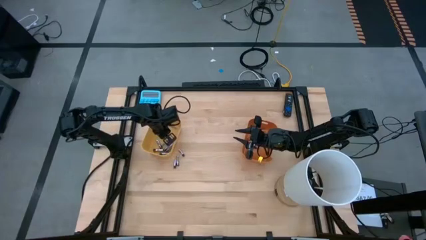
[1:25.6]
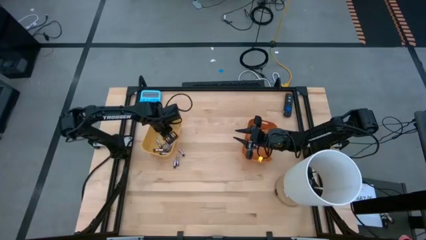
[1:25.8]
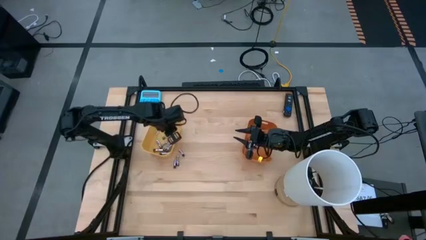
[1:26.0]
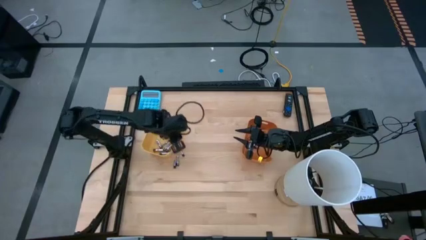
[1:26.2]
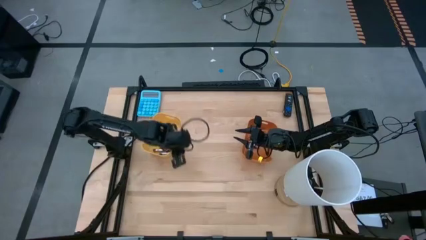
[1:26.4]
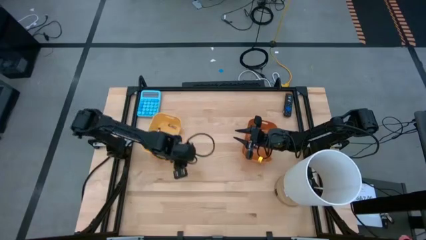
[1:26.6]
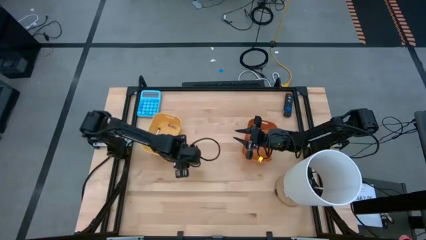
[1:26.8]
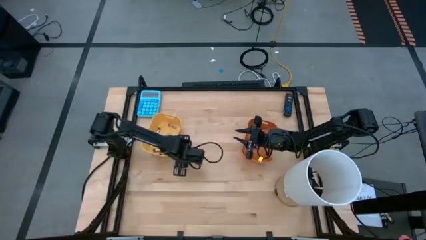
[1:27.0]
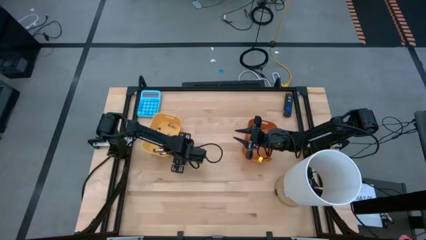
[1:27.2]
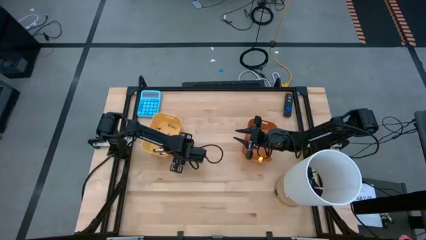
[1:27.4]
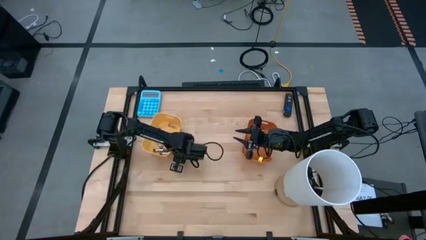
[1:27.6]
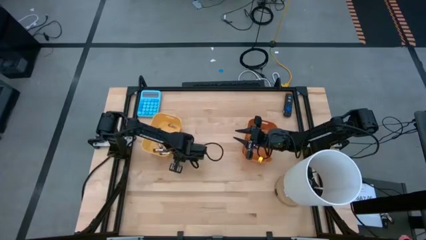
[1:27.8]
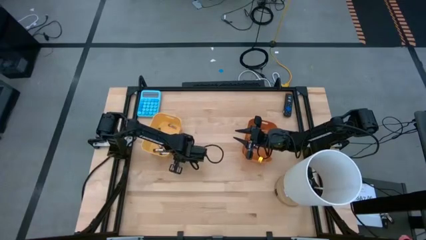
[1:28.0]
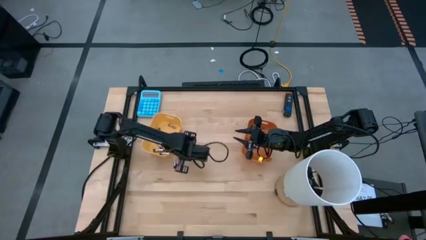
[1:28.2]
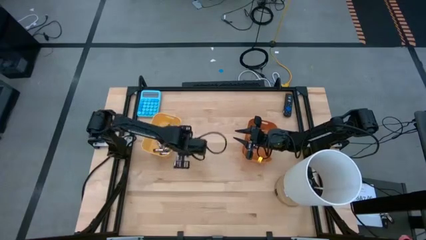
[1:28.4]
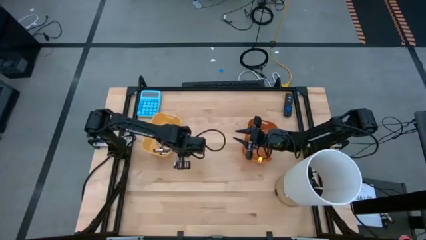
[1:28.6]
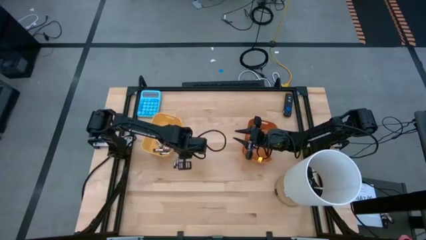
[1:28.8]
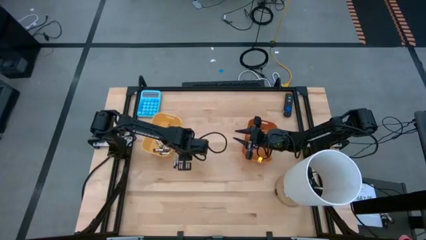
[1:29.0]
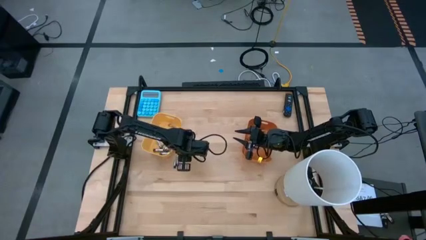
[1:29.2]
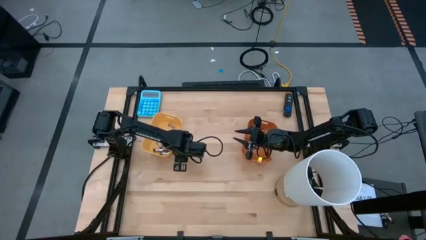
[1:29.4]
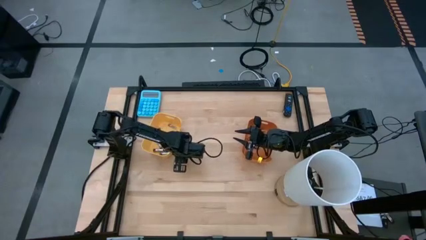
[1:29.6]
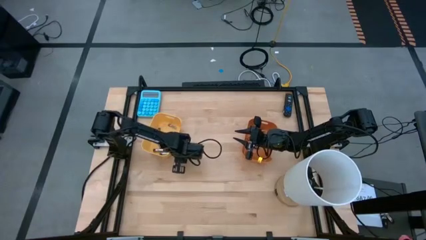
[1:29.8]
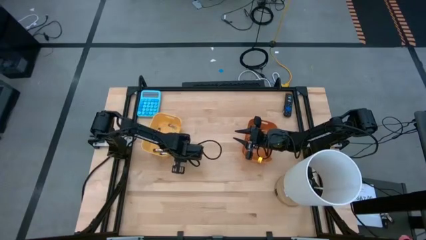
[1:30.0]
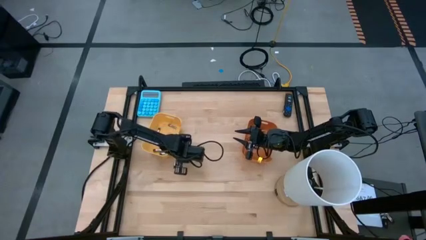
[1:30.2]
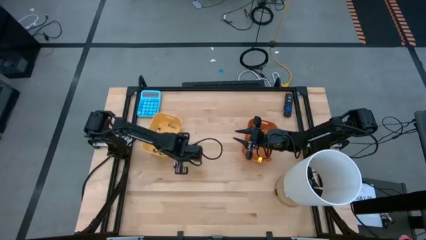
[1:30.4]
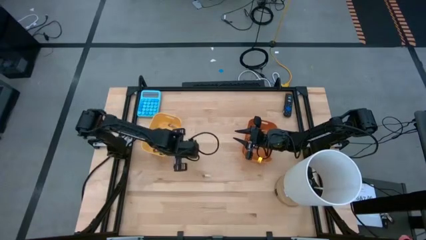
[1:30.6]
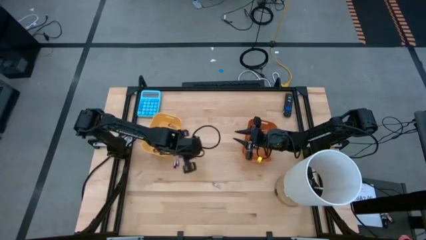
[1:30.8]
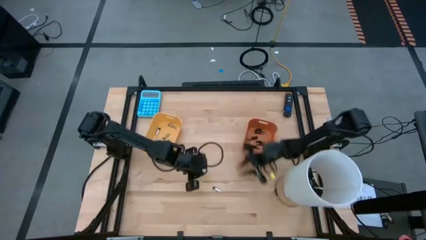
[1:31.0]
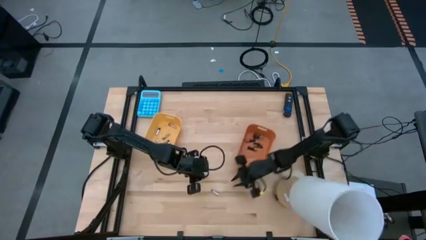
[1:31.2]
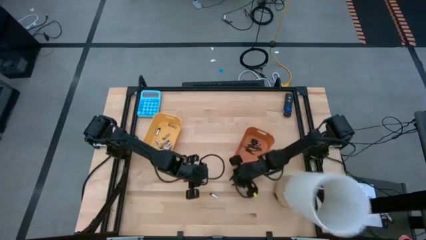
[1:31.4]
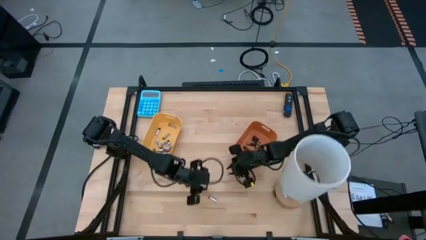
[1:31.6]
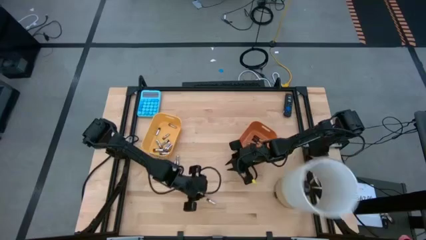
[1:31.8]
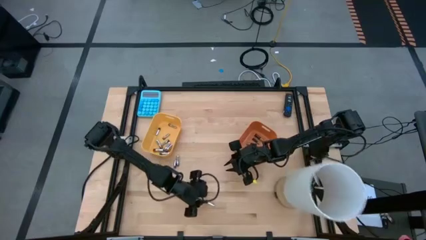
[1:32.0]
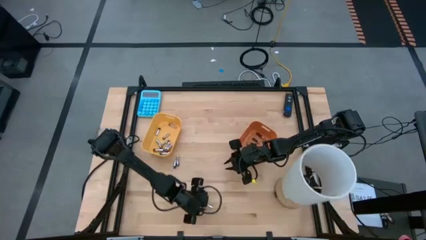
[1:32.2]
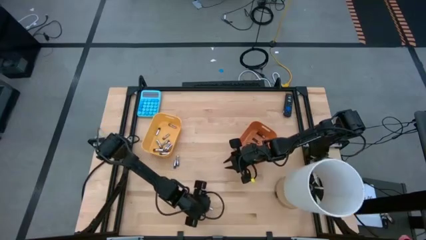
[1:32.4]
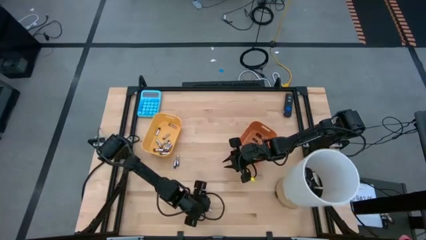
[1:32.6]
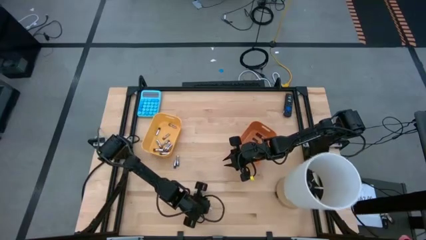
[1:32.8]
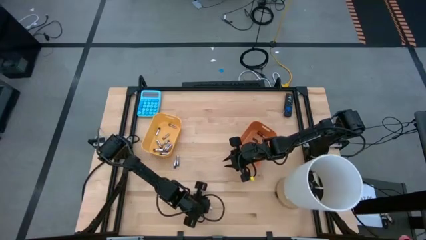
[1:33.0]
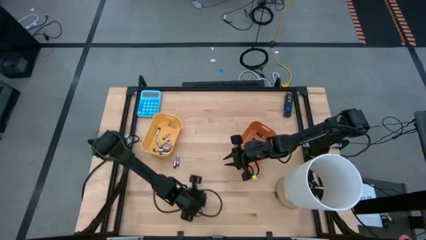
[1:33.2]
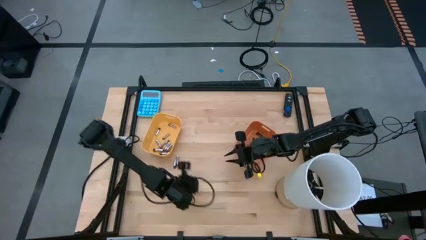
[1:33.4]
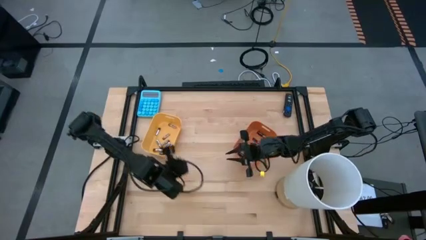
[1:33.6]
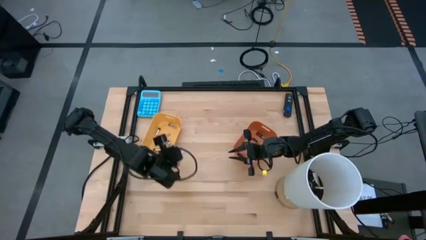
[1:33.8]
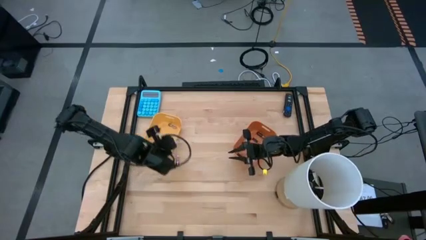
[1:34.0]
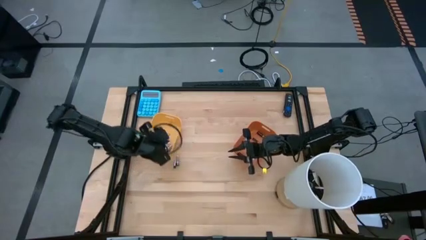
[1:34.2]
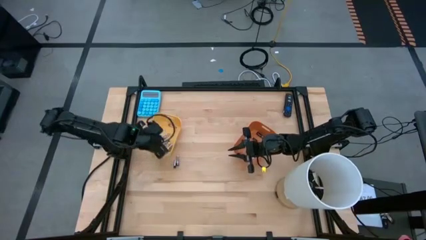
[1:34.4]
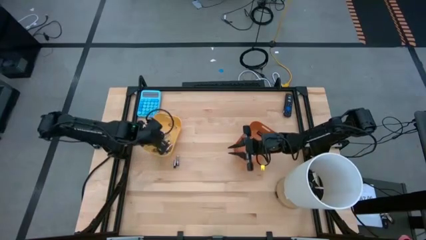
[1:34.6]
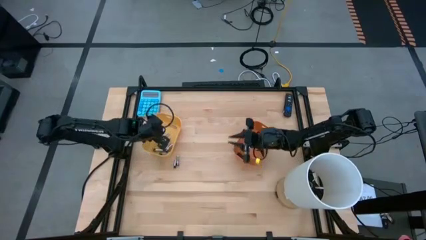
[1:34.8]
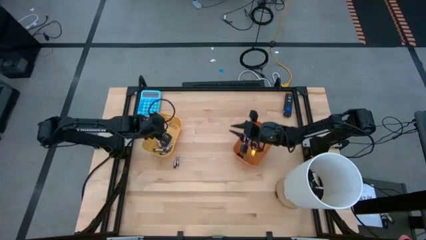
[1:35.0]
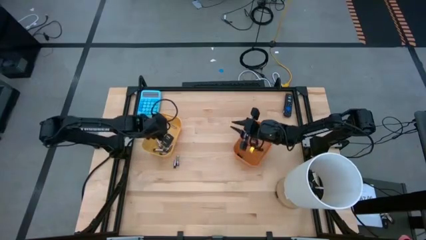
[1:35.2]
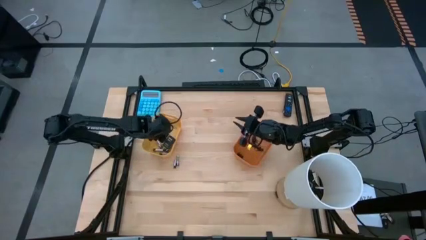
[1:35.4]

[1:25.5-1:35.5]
Task: Sort batteries
Put the silver battery into the yellow bin

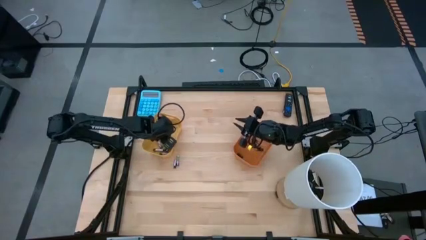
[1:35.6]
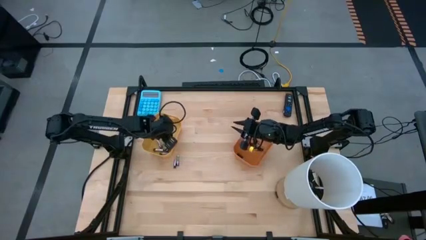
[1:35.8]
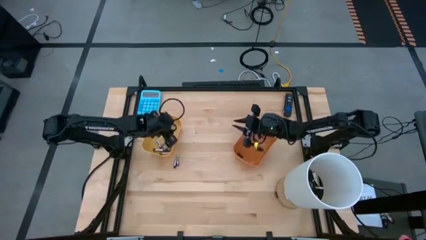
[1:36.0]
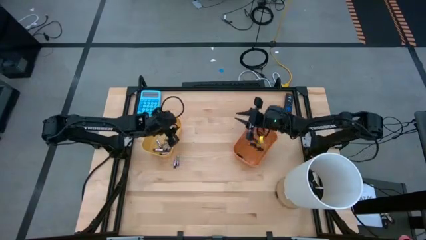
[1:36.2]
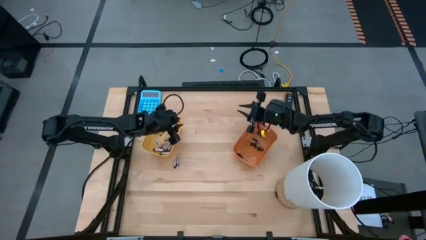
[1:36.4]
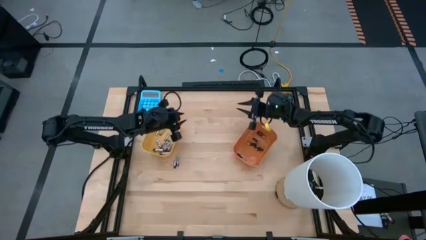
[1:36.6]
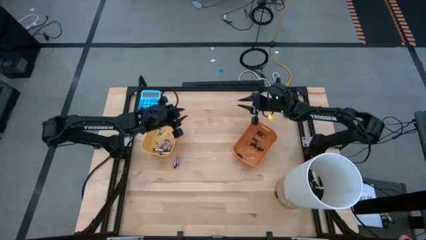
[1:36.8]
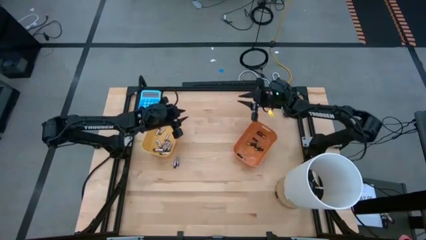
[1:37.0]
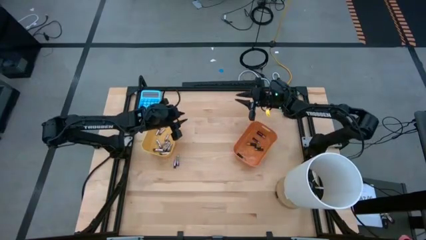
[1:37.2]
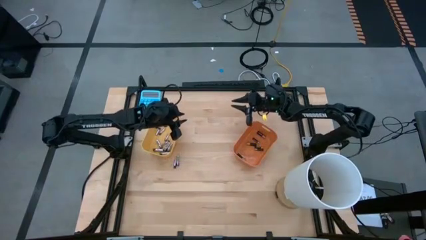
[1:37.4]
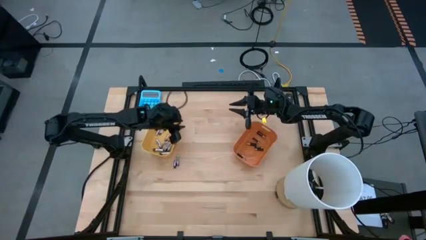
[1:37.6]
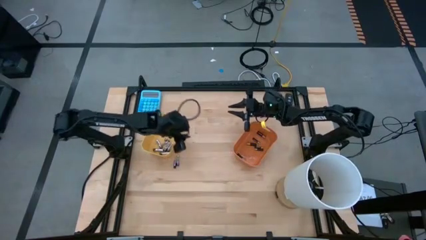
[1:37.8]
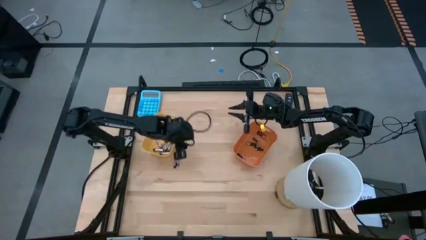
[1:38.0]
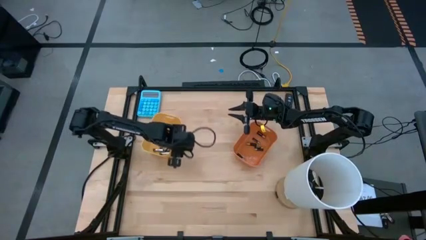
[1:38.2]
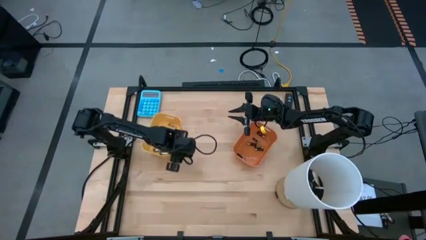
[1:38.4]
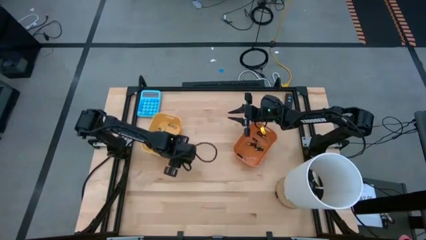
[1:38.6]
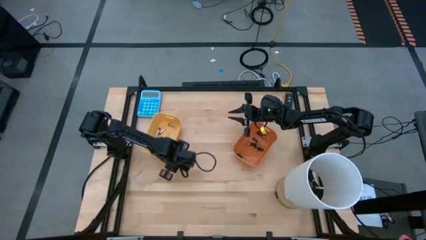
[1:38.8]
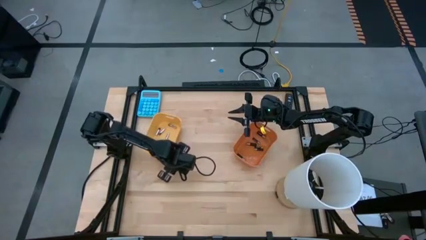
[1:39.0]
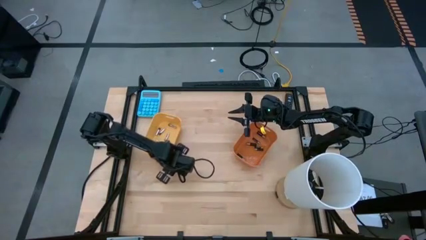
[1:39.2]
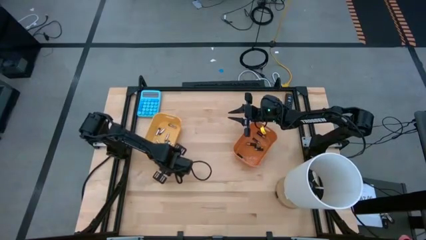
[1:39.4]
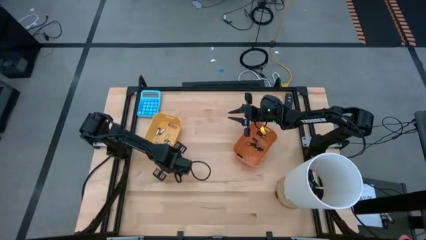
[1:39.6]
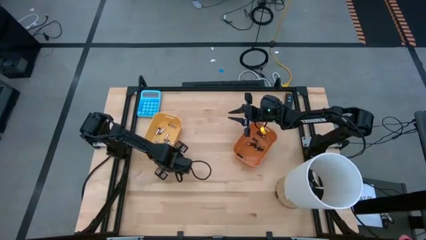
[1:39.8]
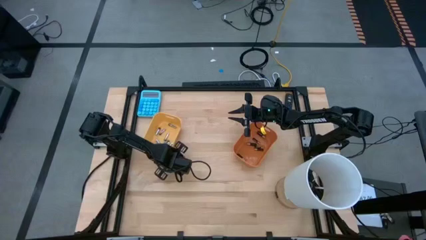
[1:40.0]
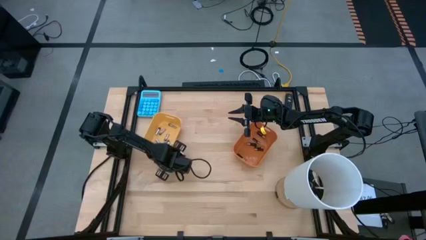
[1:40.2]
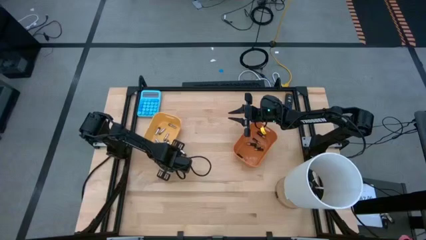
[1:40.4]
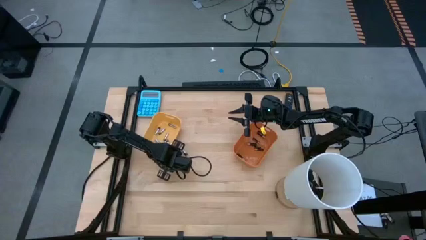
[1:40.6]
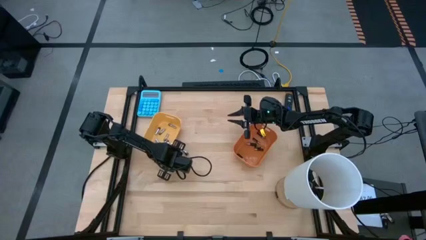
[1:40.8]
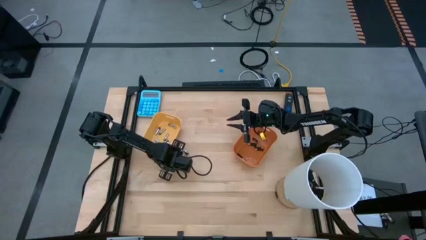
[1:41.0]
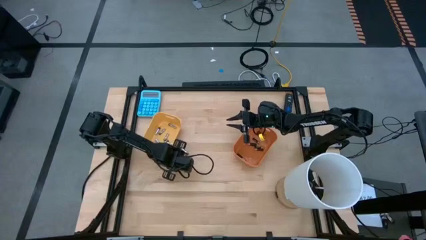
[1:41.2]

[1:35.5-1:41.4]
Put the silver battery into the yellow bin

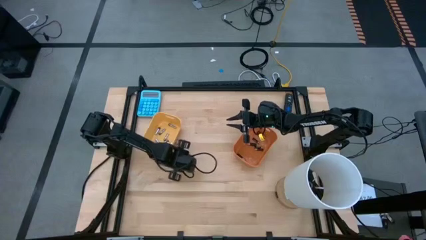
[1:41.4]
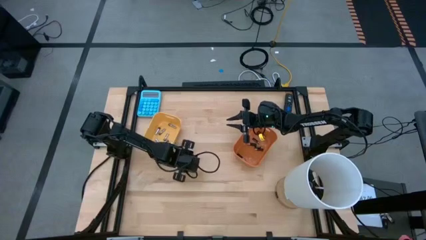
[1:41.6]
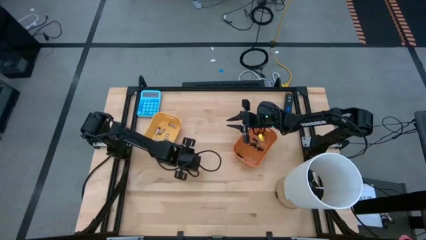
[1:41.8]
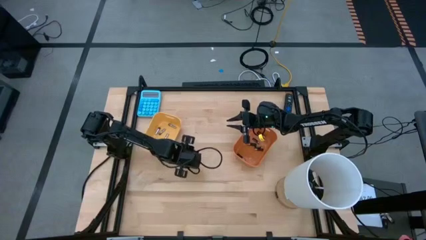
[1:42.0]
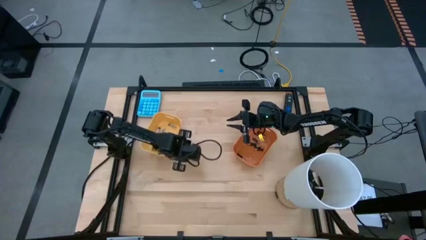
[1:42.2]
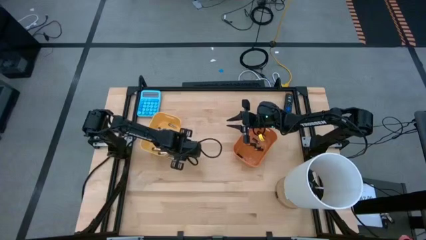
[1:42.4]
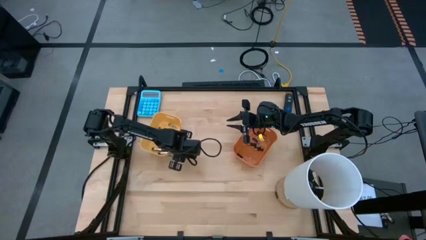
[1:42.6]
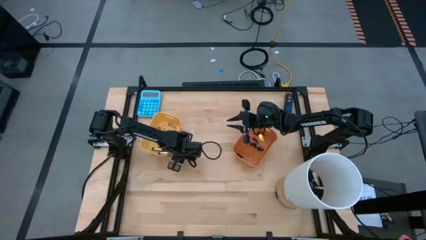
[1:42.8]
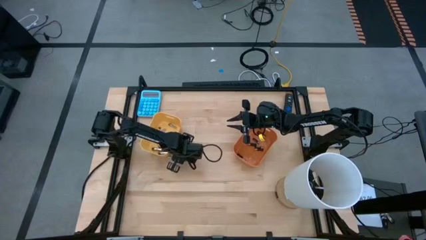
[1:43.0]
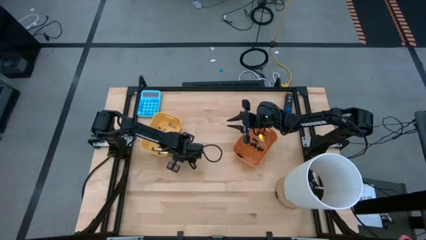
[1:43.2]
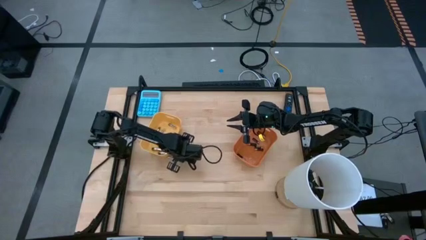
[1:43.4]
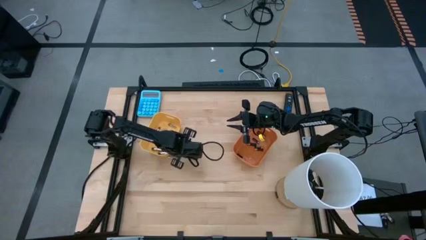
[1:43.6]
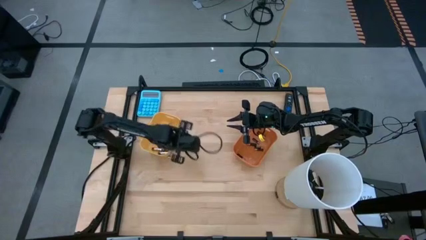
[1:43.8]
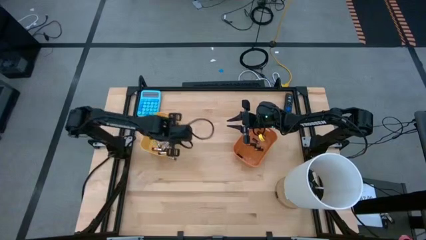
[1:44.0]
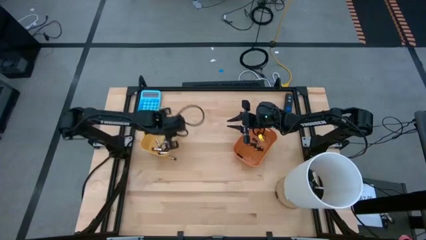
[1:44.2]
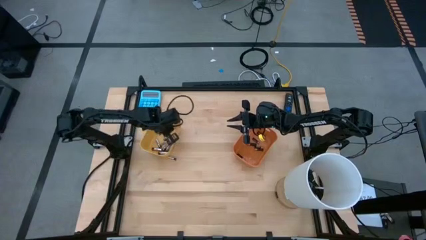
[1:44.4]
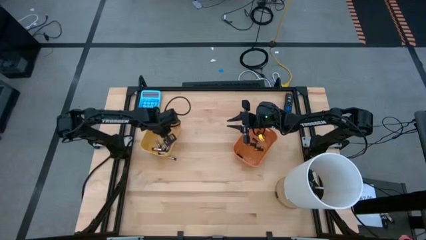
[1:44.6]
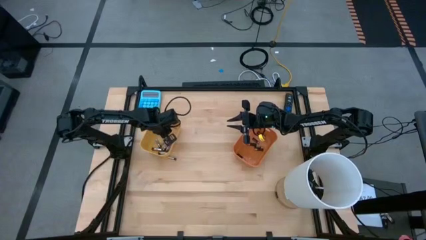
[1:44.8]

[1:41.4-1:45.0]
Put the silver battery into the yellow bin
